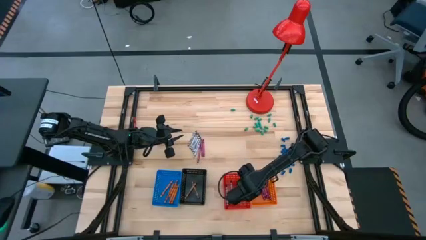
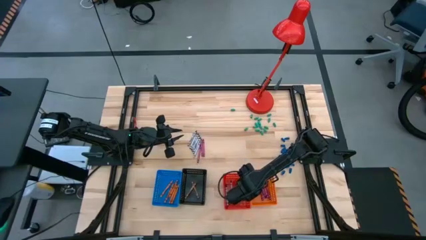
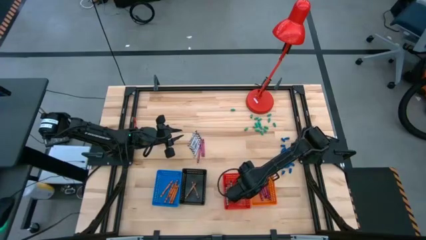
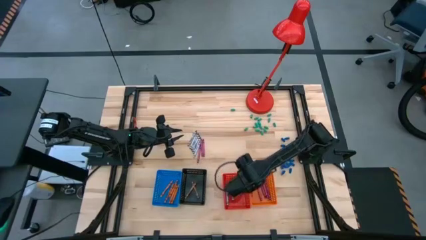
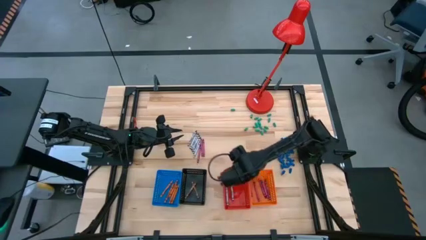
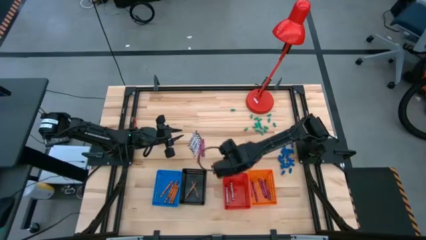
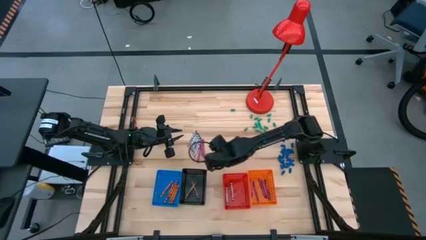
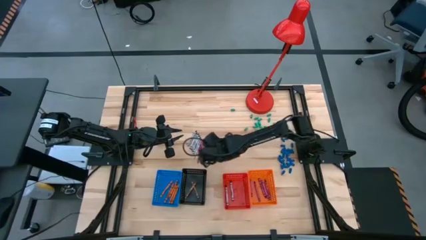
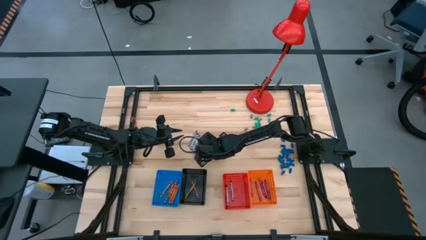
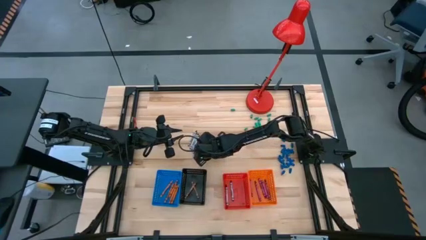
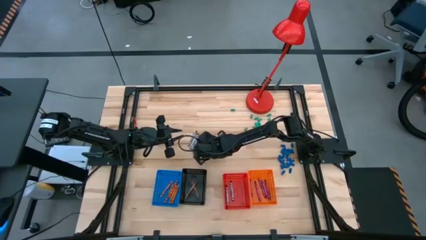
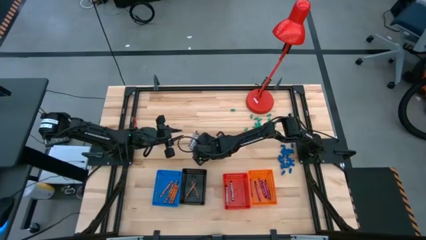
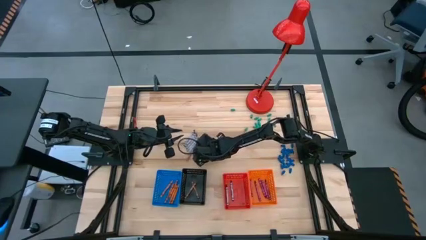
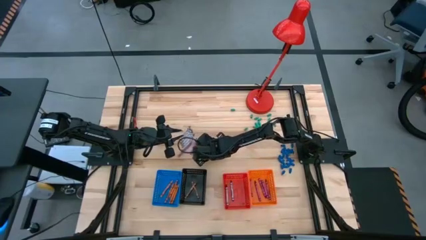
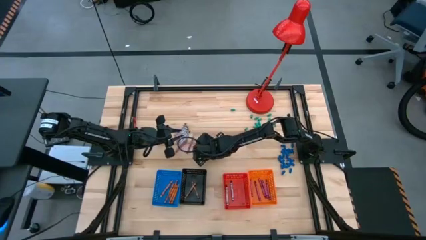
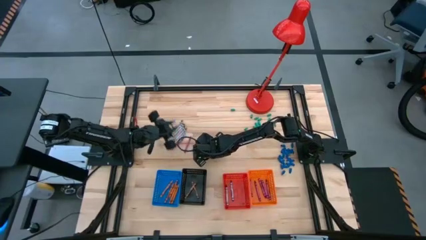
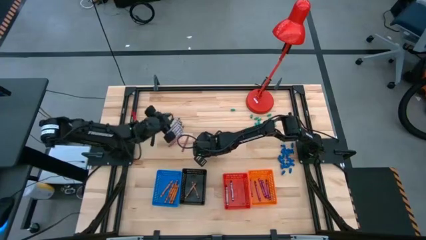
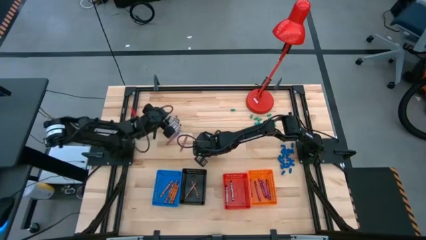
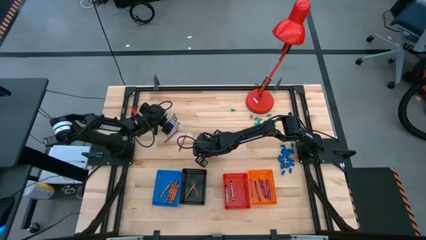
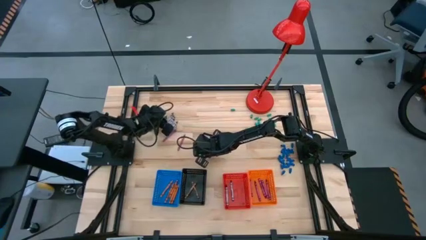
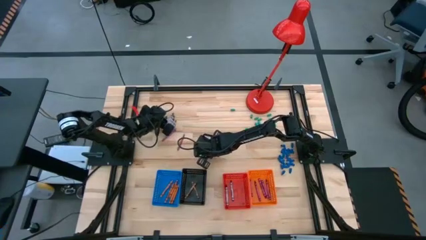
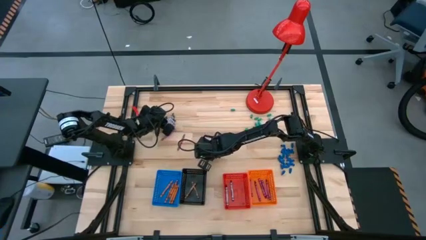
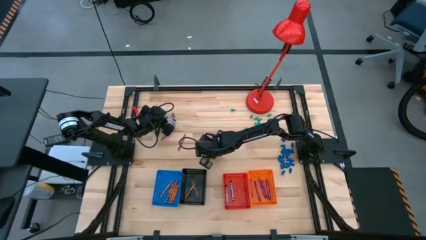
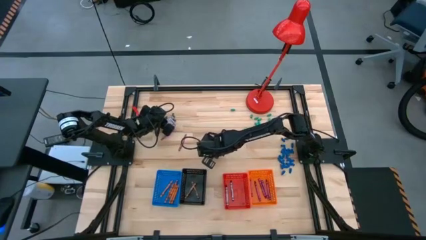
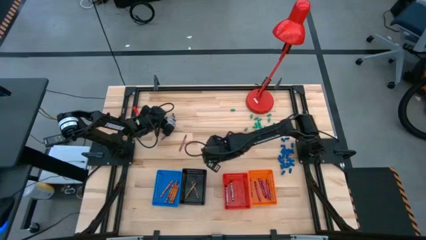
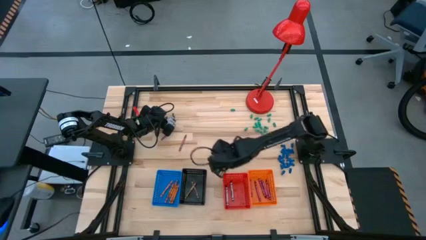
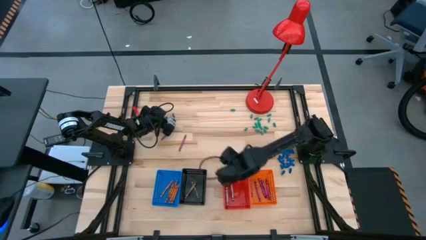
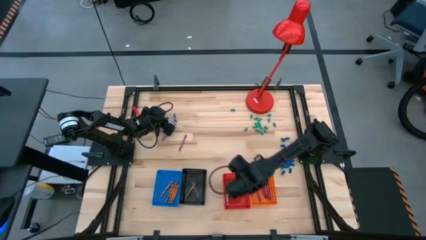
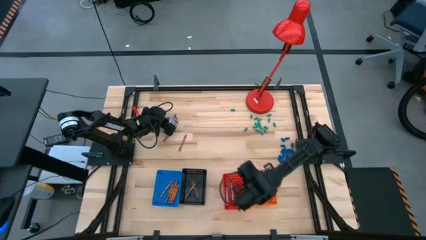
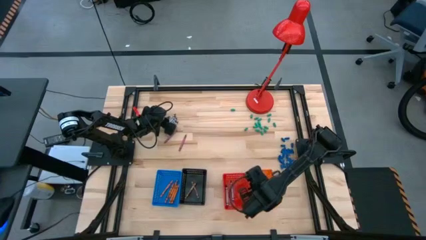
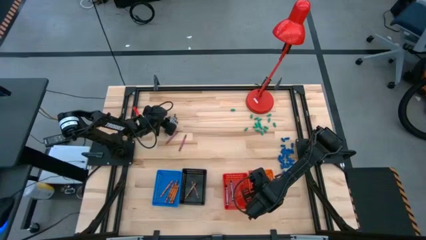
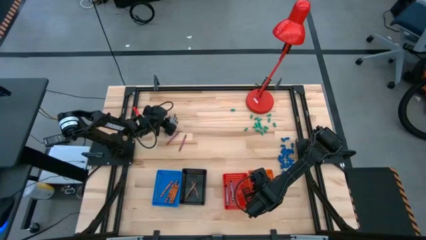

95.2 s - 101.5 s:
Task: Sort crayons
Put the violet crayon into the orange basket

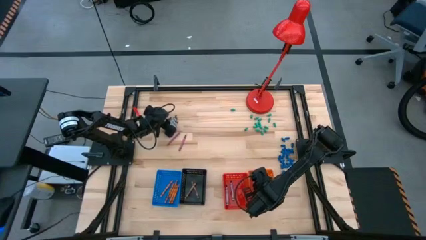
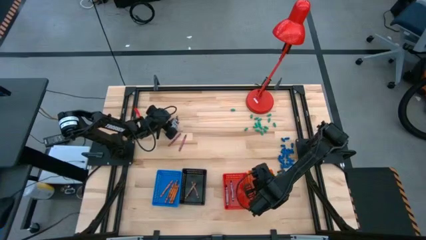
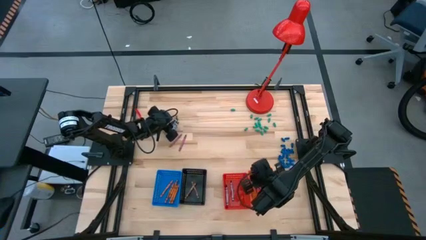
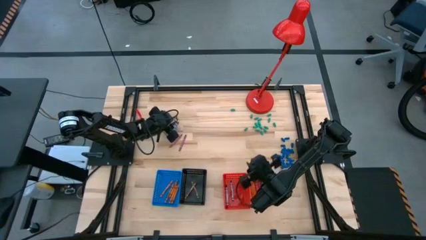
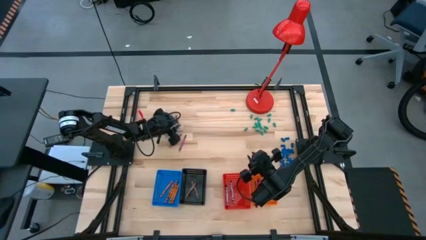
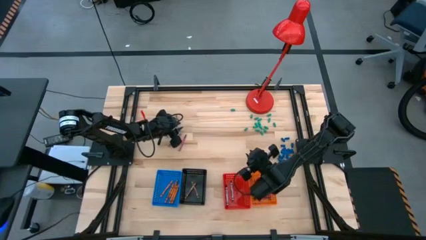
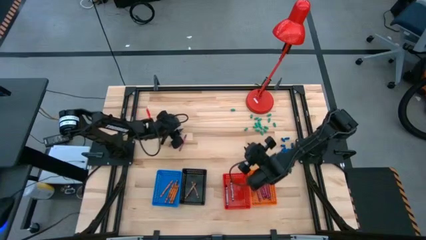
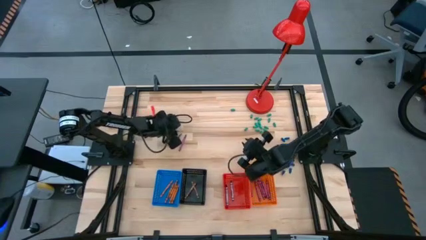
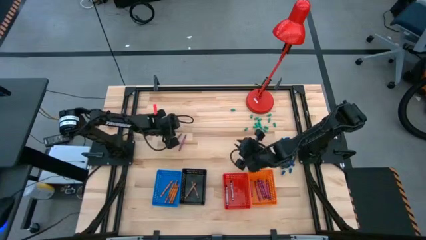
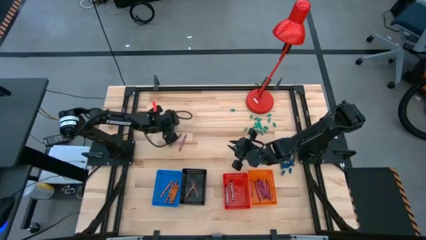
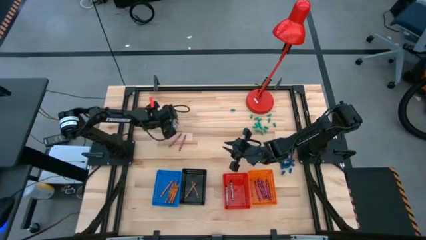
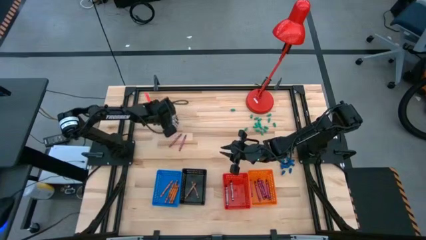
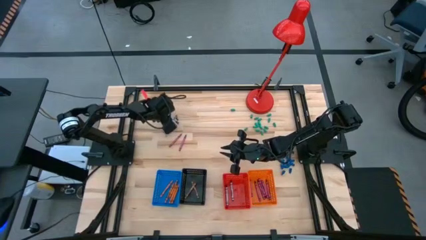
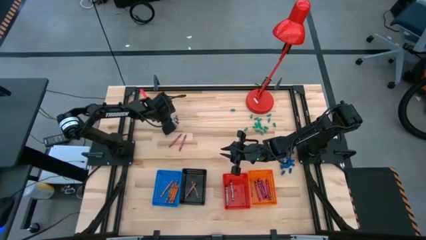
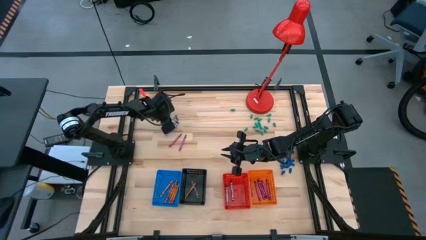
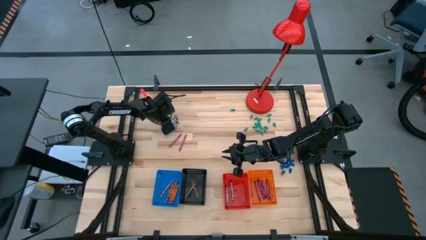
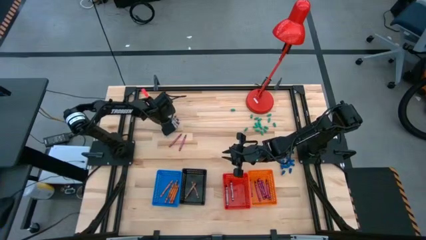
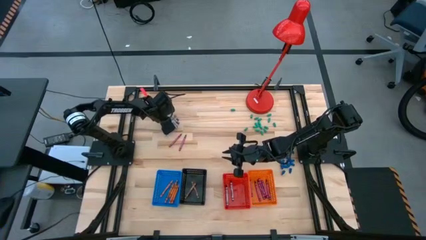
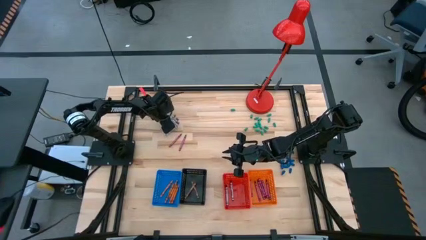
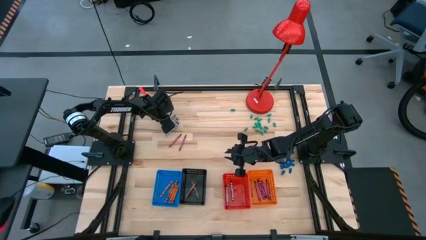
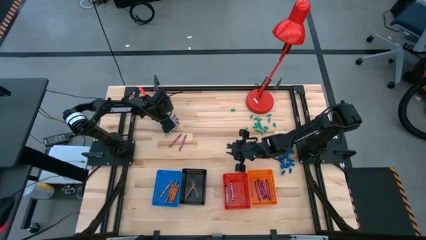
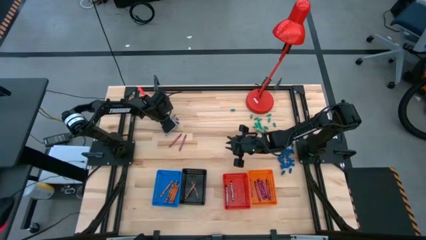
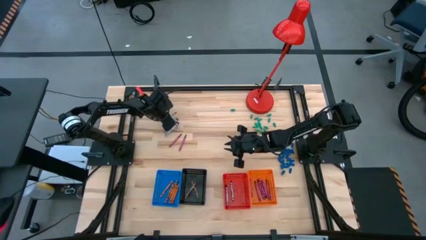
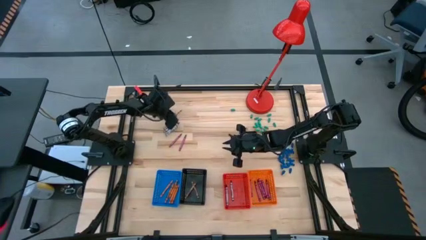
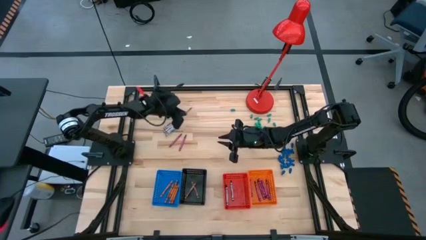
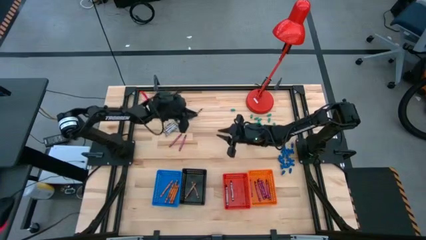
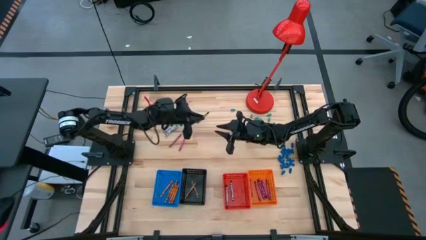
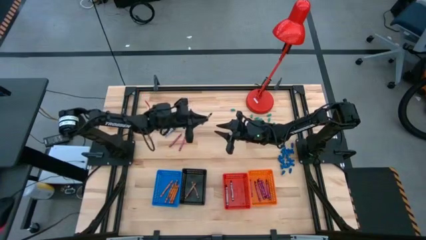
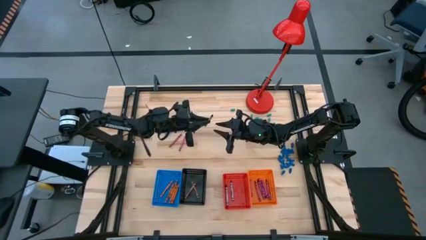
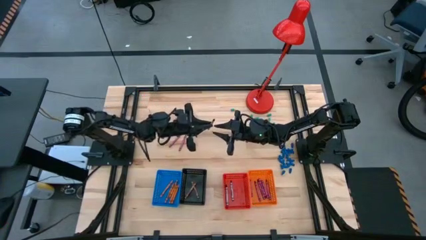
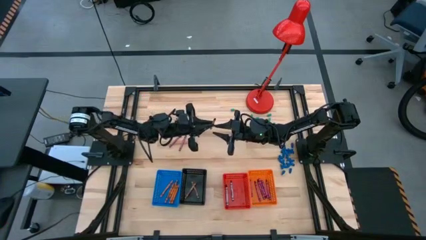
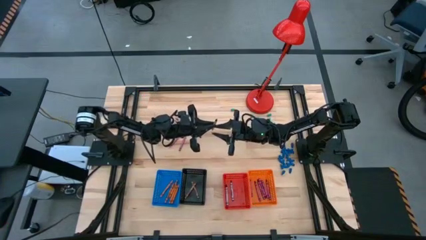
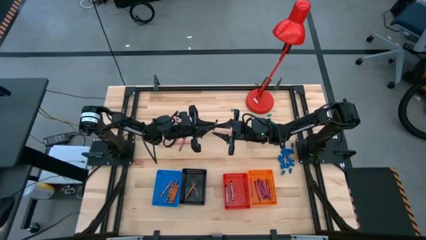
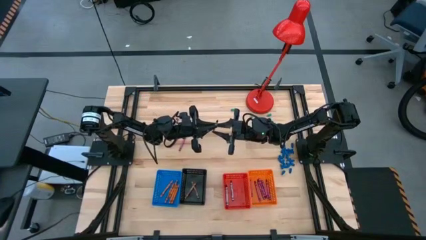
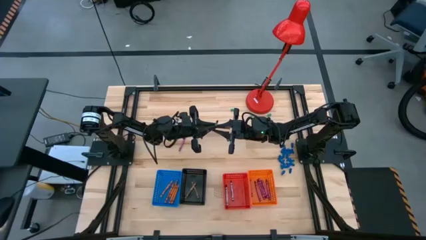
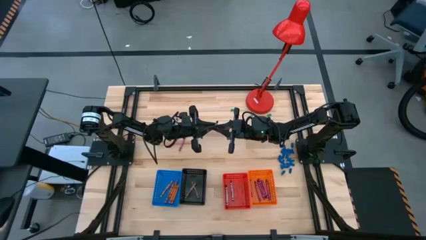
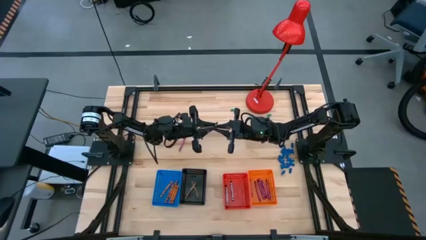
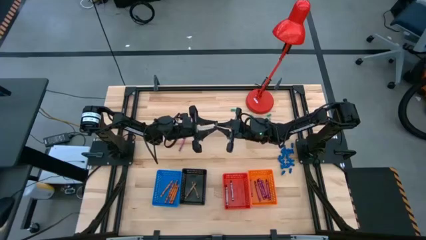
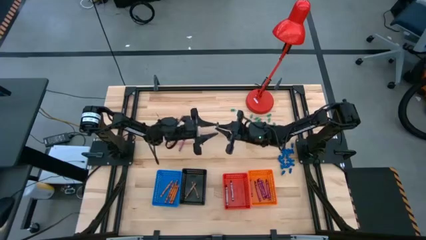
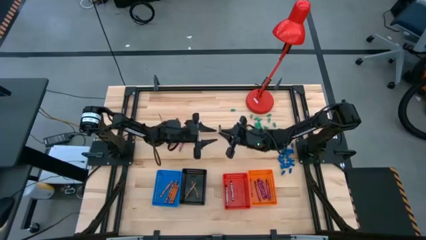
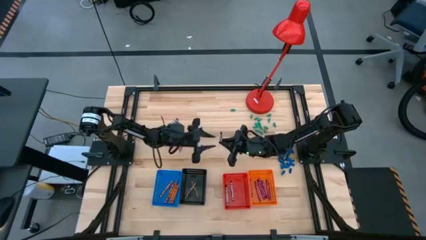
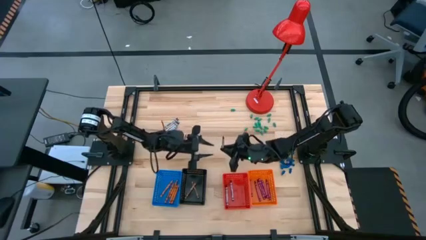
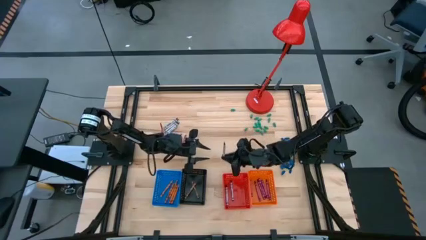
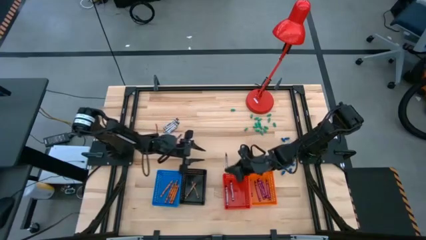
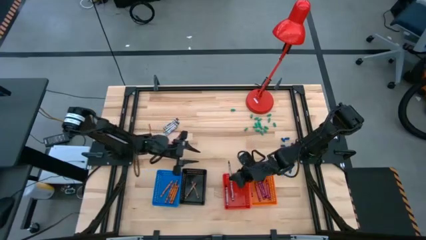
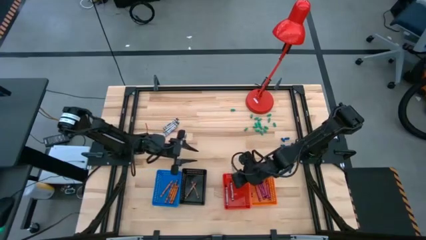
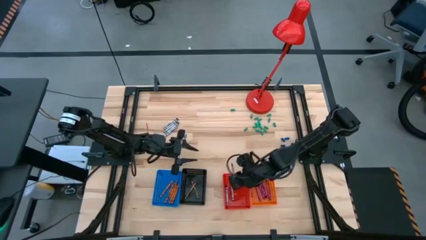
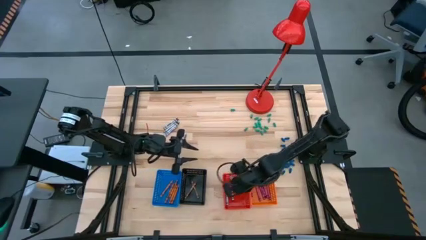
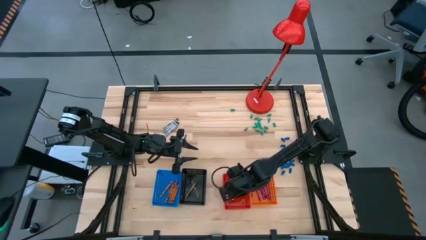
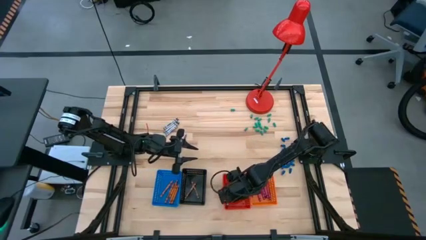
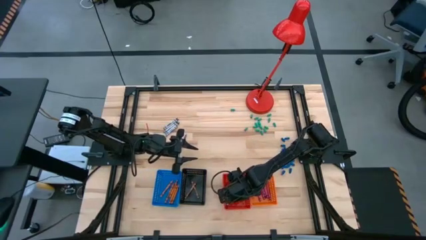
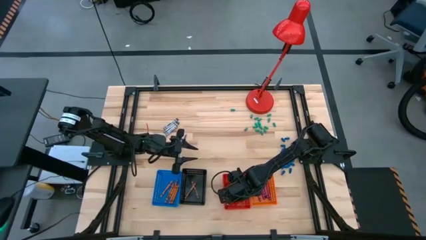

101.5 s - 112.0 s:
Put the black crayon into the red basket
